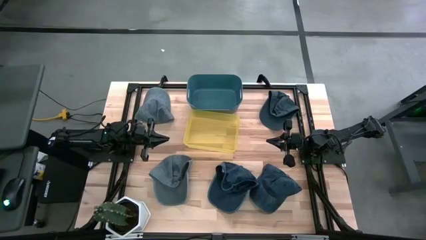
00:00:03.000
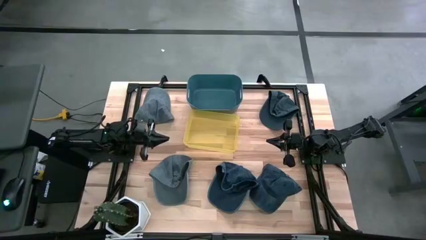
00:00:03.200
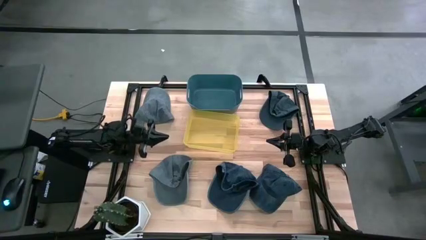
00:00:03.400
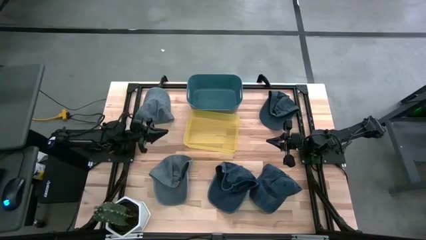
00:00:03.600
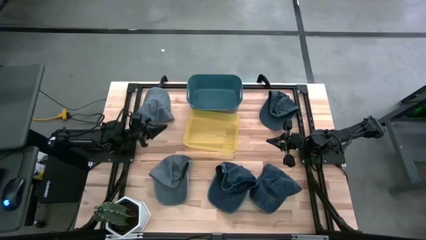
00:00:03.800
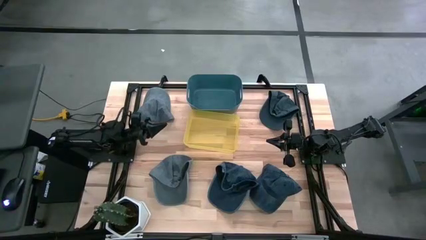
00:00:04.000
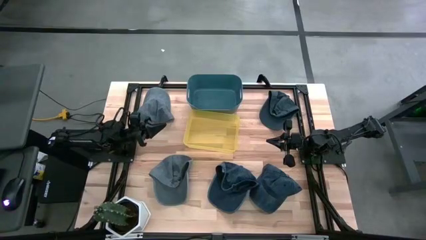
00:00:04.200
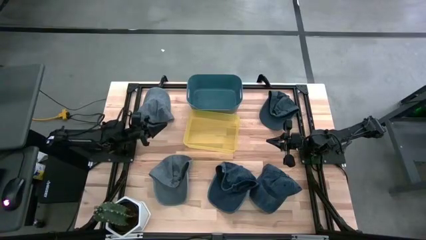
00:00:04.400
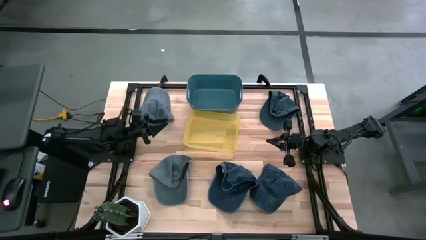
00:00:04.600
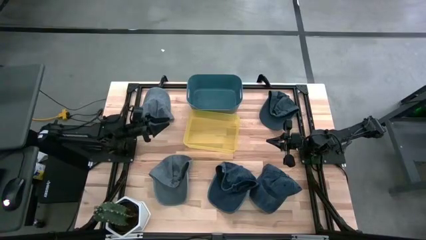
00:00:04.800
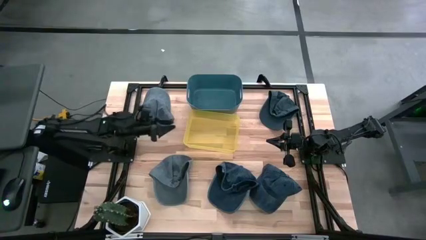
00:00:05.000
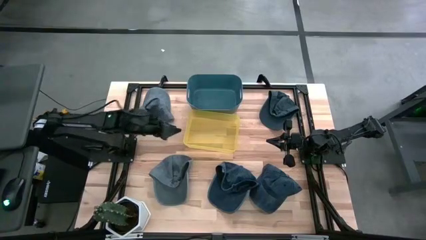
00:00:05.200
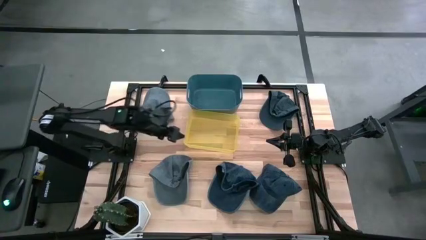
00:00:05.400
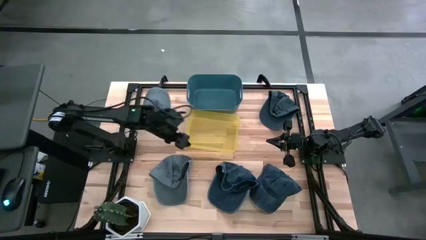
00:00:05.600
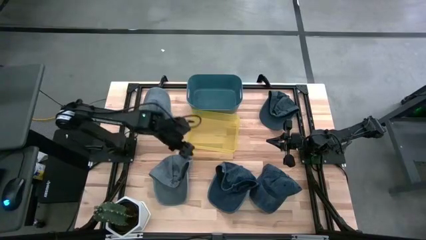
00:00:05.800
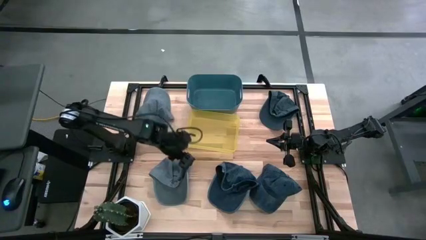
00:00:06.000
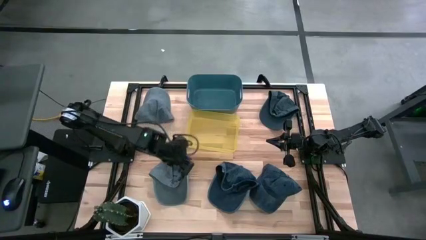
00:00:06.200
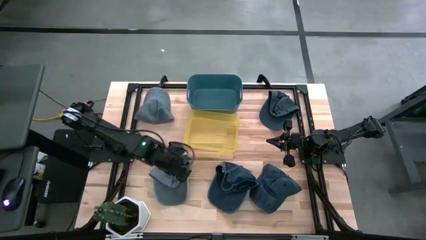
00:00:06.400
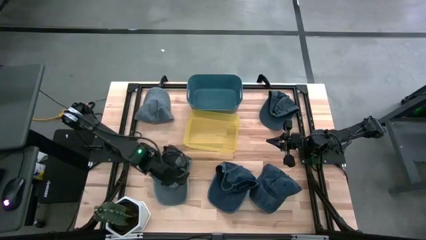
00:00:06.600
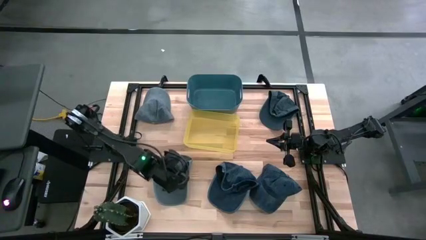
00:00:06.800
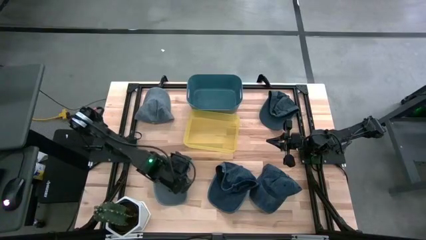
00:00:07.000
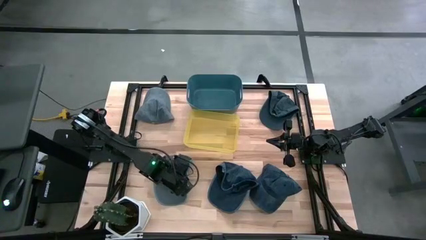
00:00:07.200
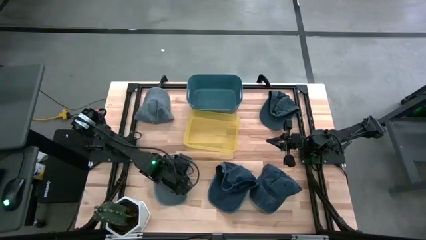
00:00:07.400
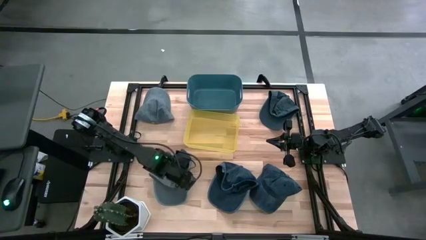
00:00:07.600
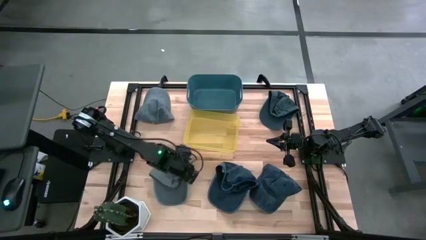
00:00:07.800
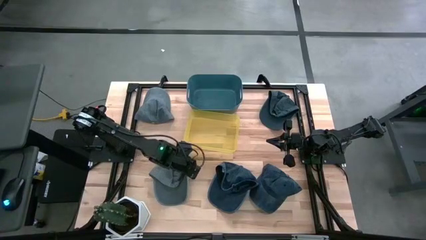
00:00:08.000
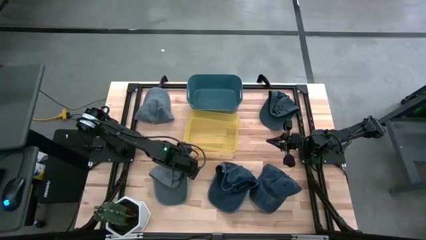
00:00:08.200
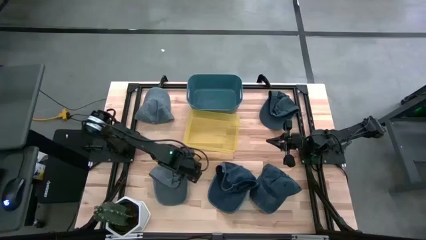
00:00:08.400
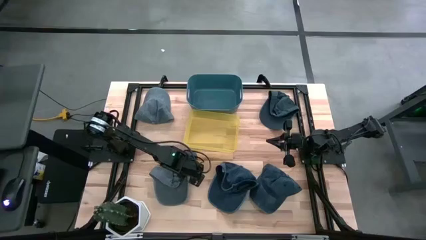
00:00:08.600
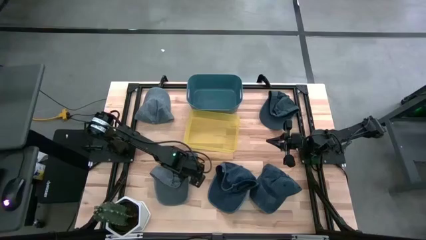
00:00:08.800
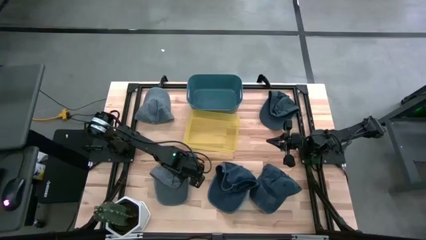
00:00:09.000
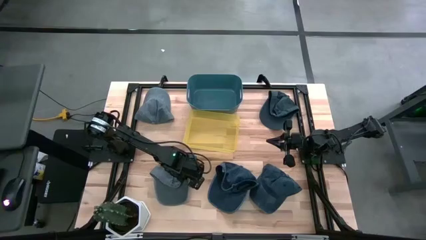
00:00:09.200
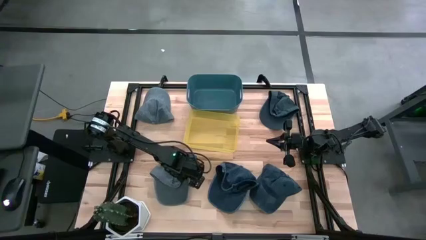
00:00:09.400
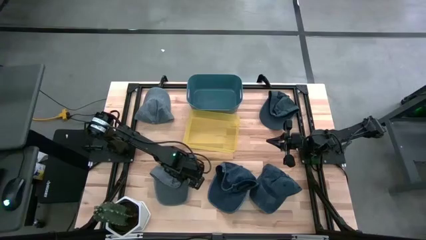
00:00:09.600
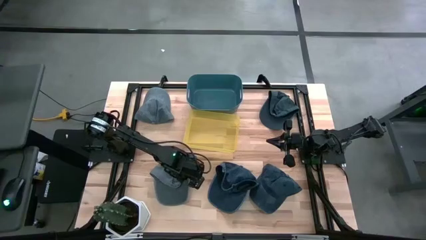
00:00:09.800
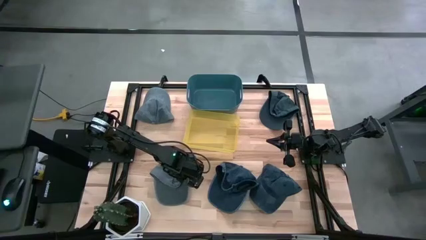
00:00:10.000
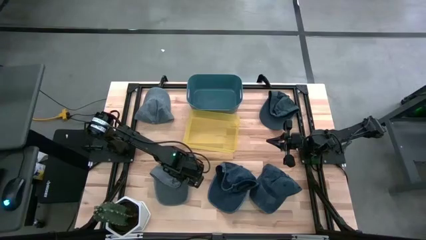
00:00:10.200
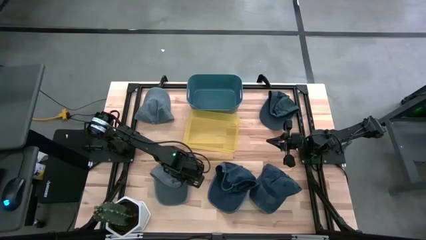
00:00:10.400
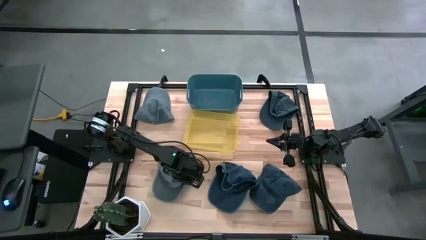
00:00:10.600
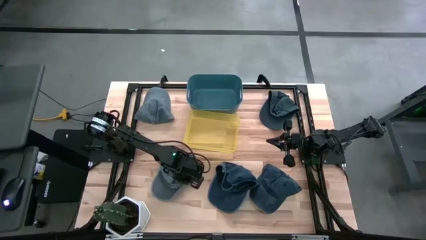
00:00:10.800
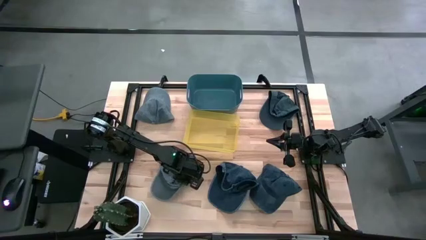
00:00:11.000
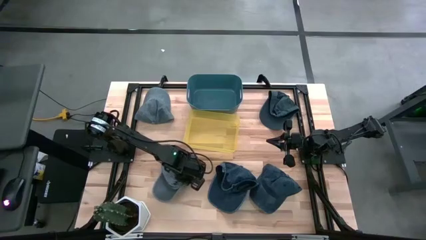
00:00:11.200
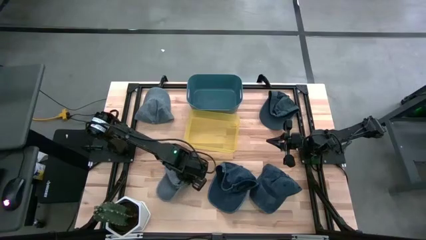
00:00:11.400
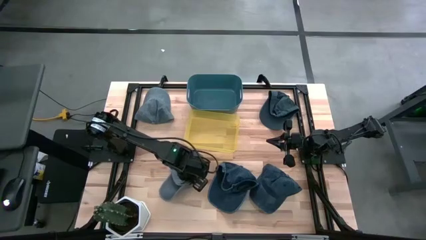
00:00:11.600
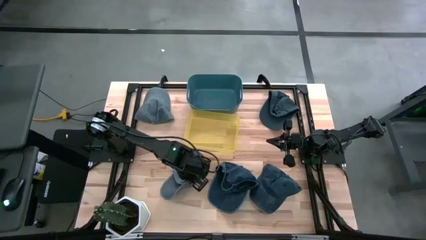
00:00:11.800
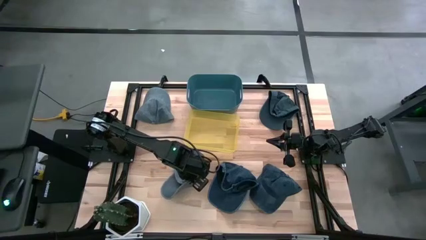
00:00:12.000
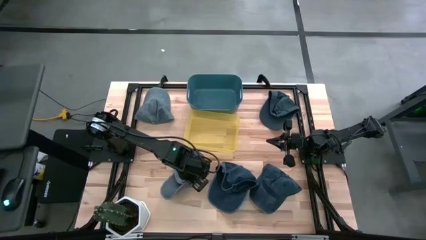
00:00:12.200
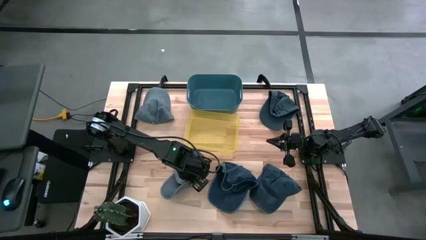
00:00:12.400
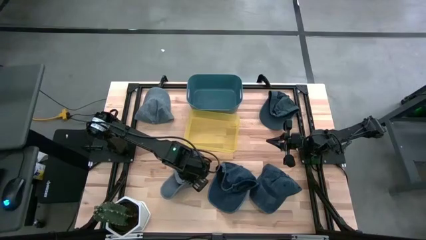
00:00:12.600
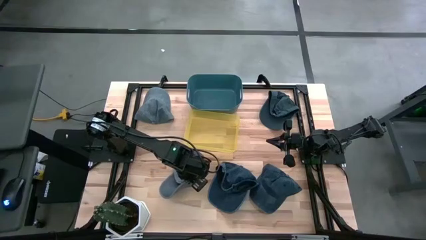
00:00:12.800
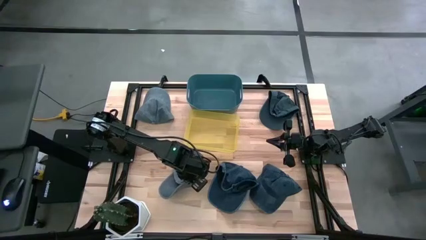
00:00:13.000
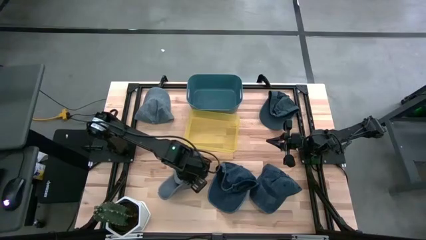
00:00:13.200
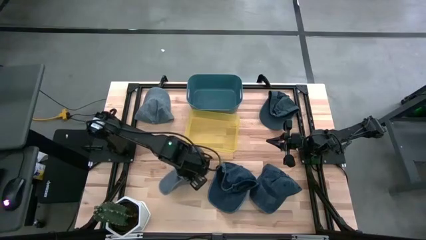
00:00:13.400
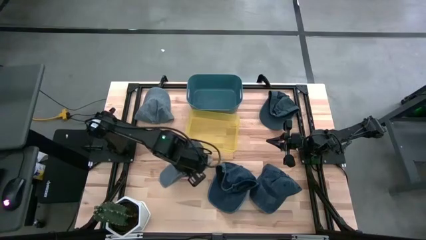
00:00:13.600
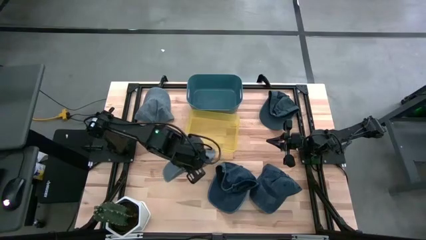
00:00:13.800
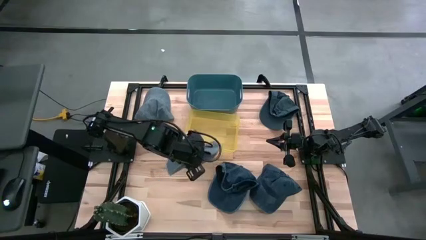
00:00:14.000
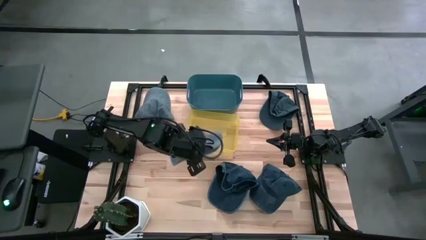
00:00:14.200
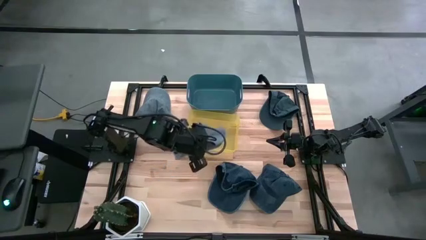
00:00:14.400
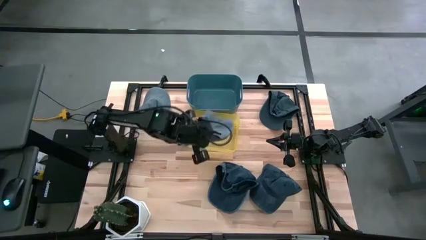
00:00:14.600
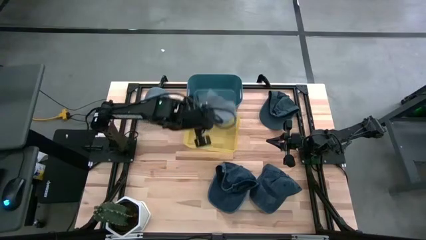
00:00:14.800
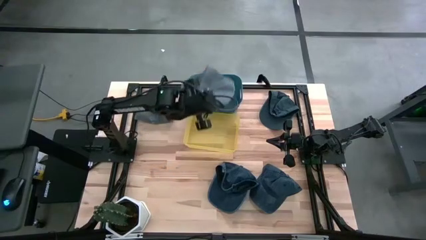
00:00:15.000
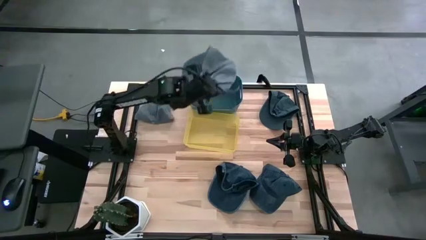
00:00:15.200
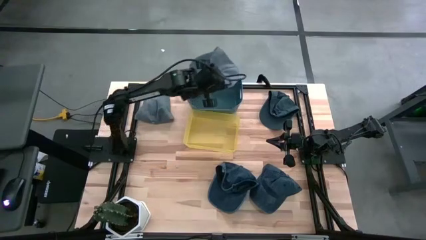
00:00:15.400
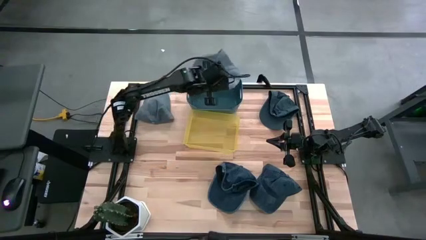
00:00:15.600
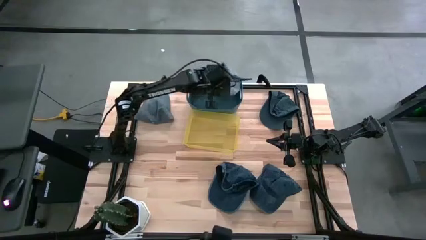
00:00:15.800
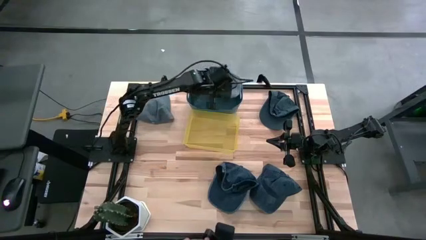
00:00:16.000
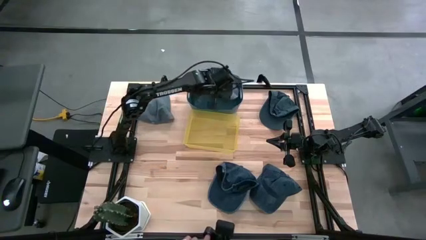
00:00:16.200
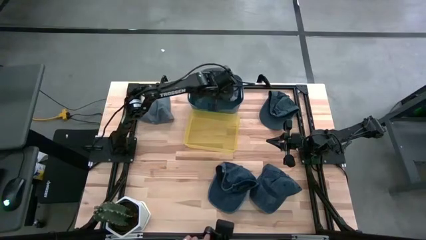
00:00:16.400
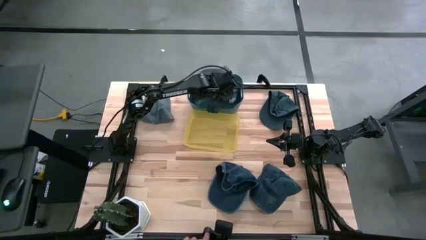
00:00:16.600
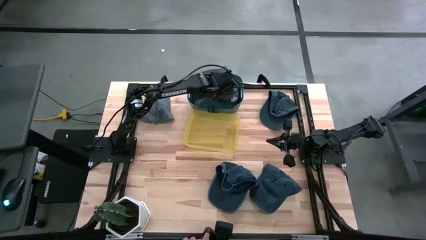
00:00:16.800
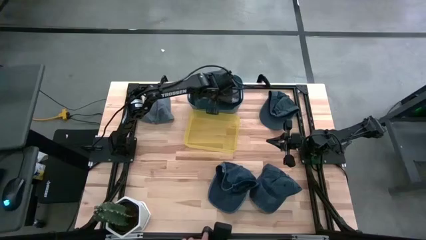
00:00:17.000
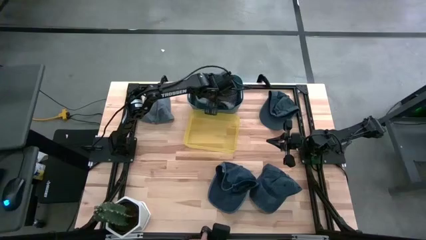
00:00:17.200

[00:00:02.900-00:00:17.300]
Task: Pick & Place hat
Put the bottom gray cap into the blue bin
